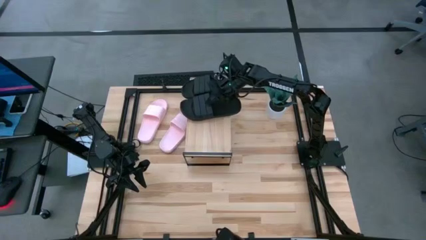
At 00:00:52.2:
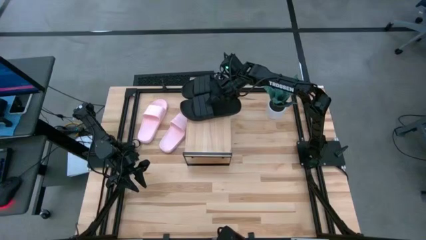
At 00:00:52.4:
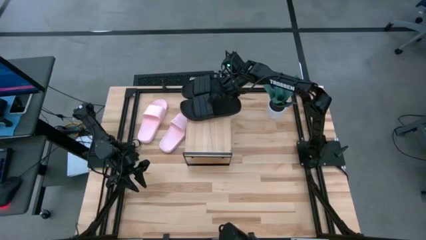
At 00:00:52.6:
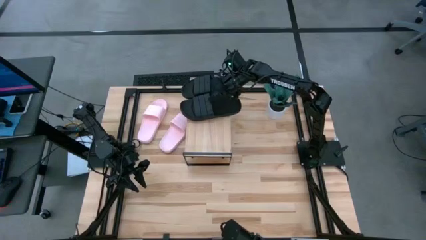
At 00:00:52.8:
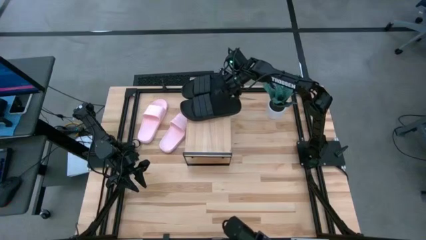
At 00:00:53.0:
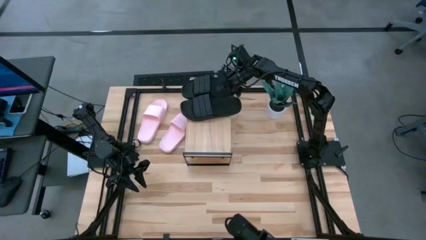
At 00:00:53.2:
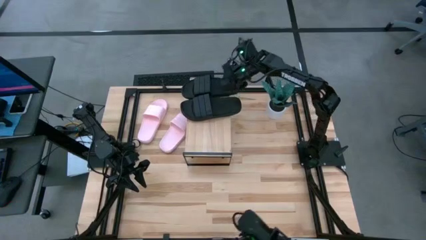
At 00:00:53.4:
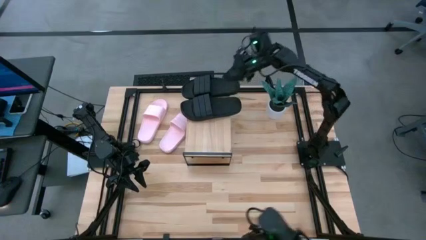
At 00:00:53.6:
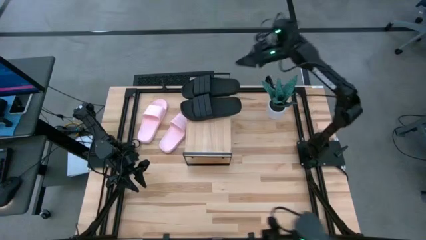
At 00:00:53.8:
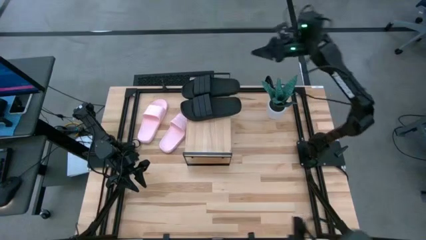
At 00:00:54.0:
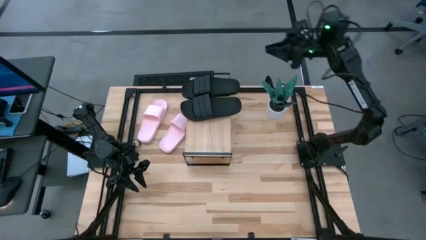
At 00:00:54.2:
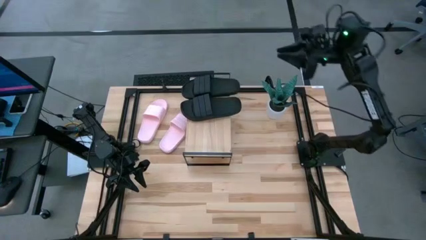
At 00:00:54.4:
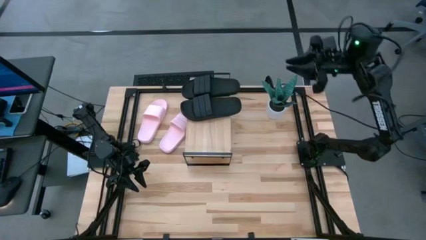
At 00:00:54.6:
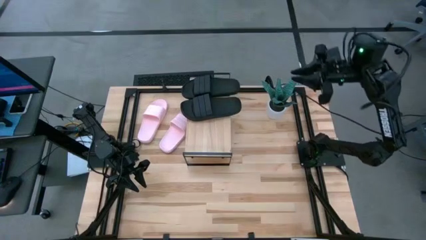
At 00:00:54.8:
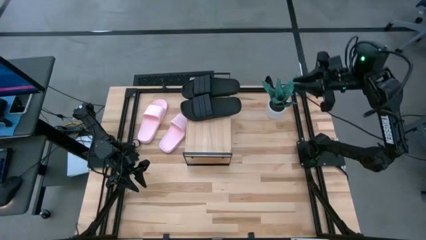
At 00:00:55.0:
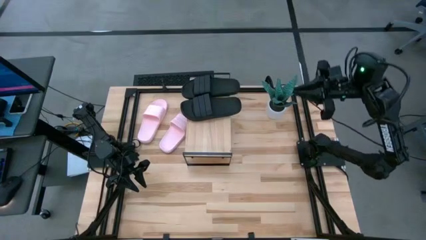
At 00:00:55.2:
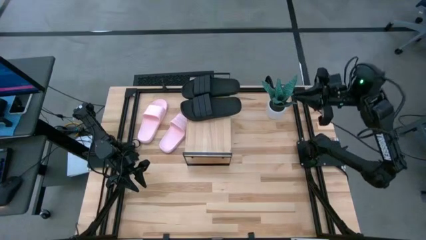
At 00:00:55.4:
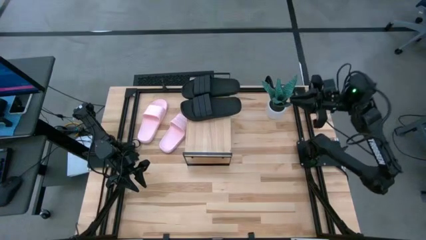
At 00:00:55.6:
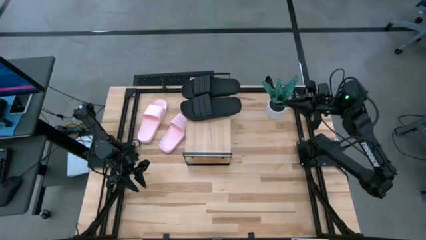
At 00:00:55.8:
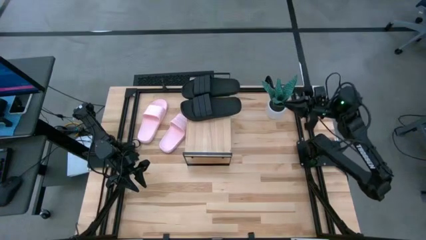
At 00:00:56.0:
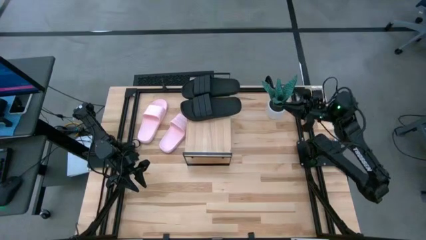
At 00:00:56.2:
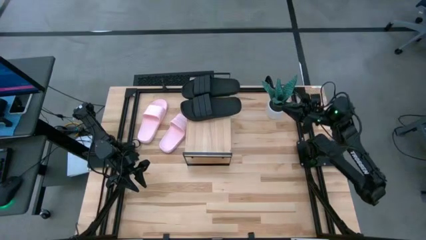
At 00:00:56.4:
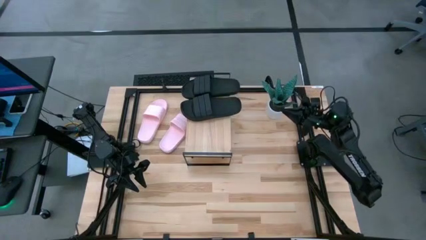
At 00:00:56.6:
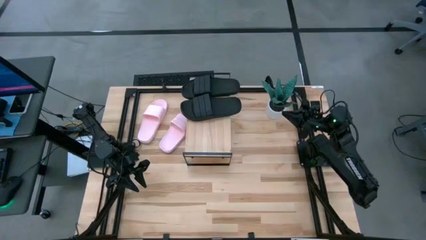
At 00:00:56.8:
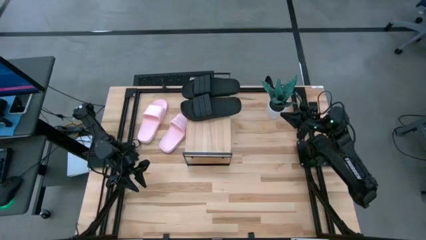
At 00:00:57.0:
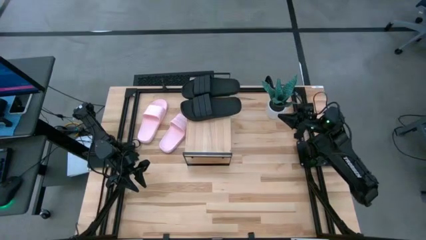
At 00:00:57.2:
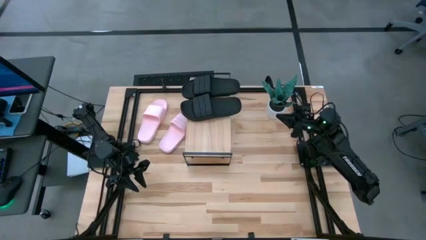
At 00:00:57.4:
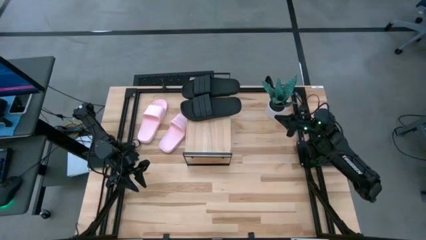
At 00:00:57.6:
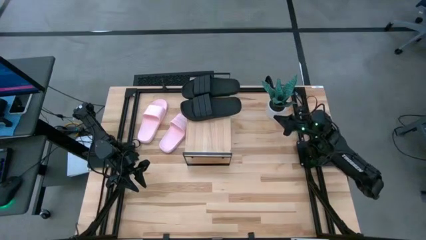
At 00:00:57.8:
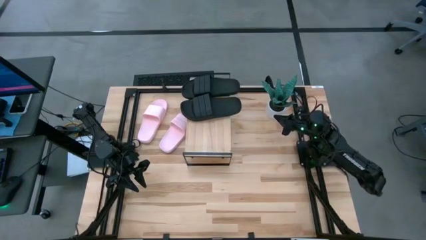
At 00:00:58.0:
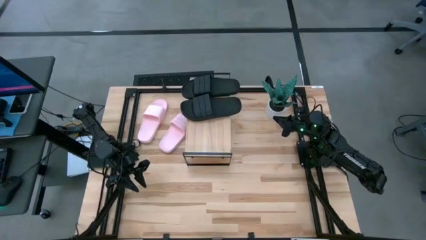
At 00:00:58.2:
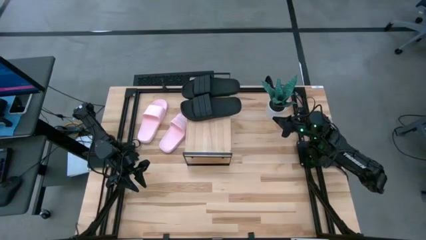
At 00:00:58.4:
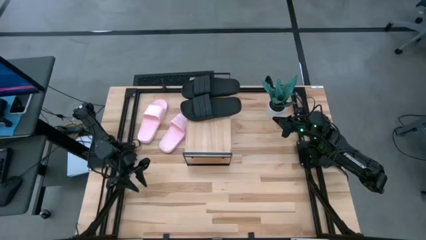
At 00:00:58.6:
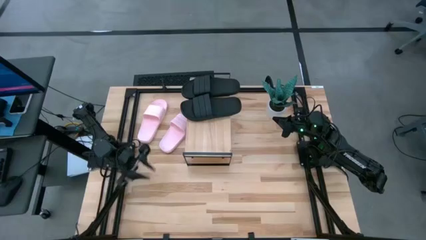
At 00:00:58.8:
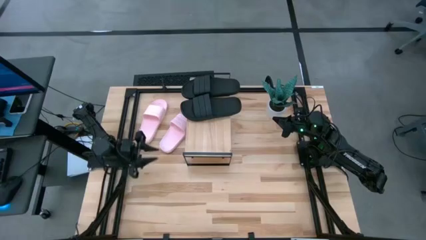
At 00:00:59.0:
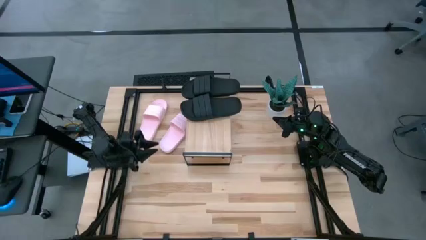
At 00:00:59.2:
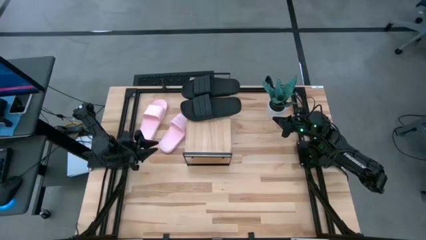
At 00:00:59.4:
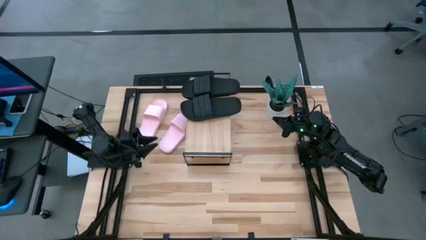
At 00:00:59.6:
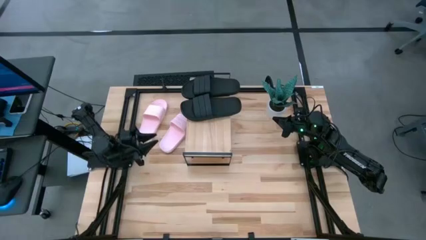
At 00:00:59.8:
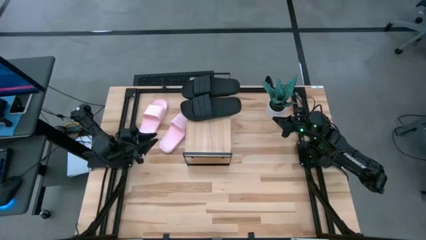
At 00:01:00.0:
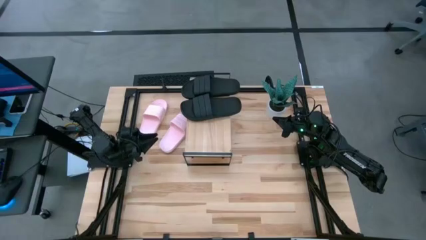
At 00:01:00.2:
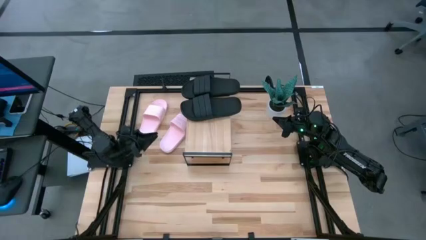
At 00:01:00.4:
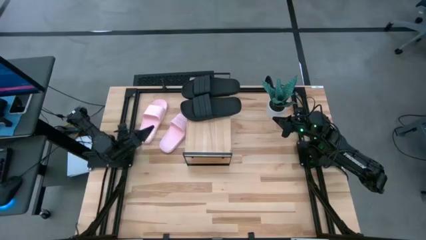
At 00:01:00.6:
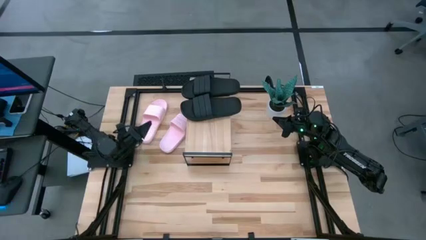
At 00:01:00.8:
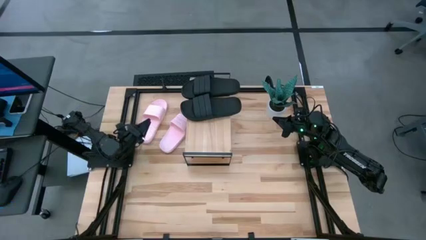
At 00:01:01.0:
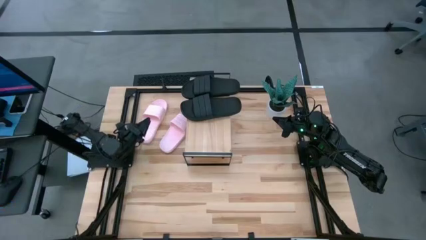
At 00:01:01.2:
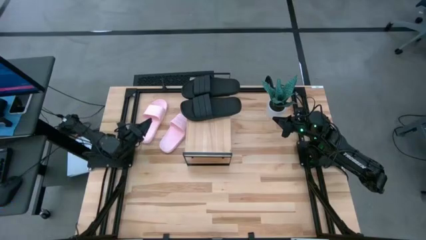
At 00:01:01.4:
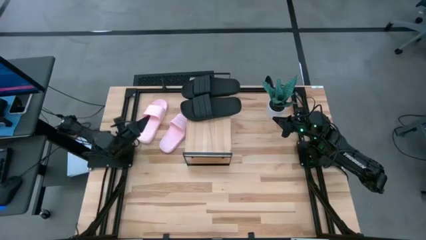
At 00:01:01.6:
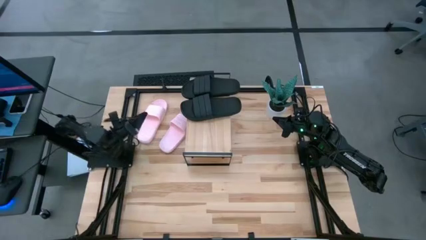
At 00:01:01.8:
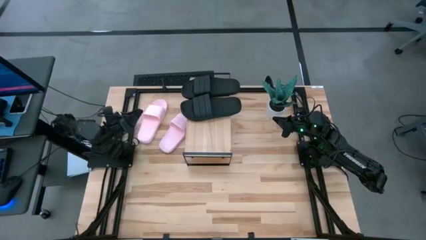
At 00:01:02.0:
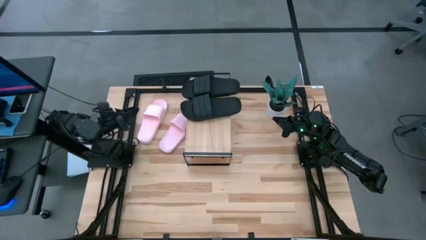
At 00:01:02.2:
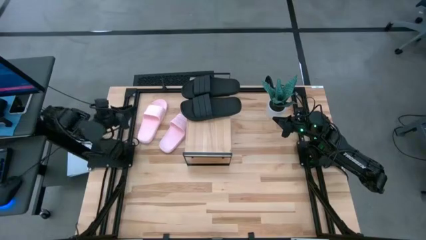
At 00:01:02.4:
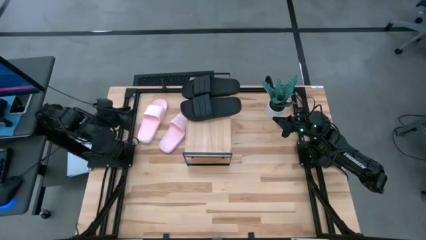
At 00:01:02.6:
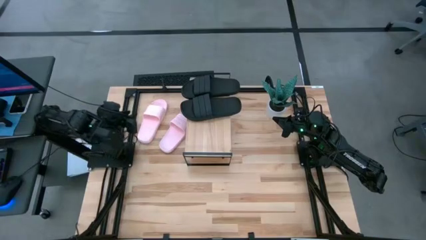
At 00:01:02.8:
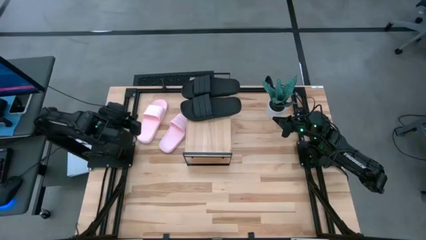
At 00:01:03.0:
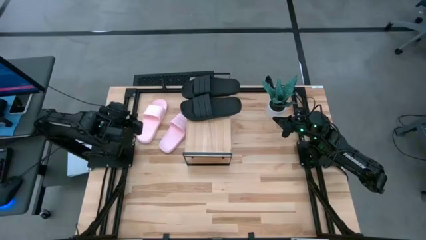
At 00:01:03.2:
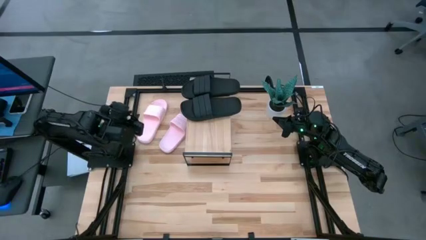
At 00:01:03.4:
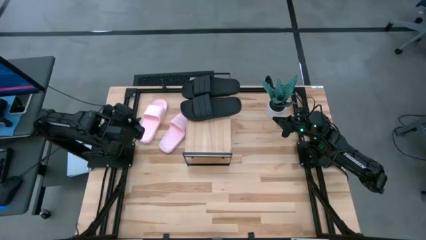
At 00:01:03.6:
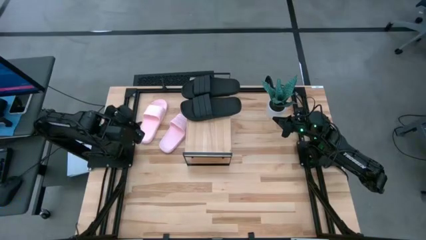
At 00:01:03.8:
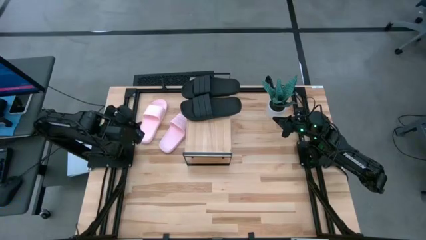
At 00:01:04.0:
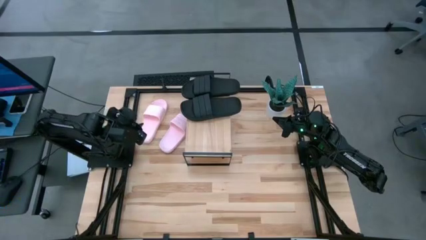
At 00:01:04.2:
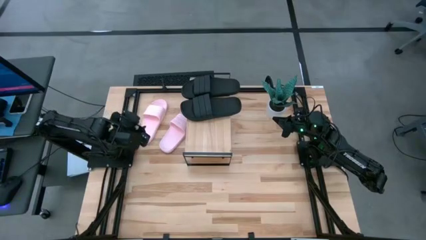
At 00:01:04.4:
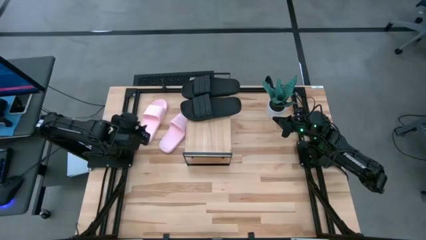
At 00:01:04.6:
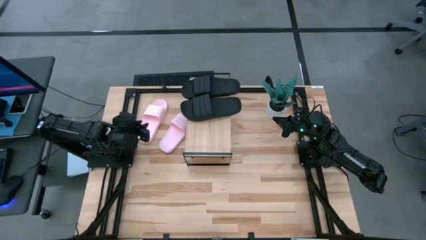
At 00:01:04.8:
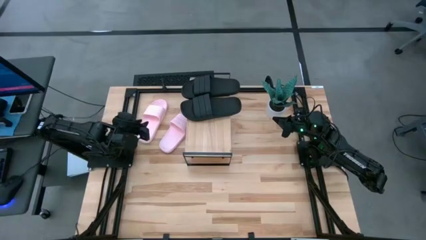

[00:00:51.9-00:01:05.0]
Task: Pick and place slides into the shelf
Put the left pink slide on the shelf
